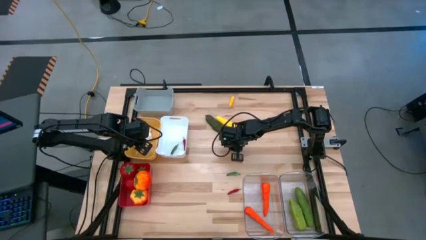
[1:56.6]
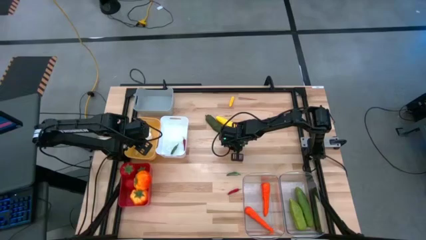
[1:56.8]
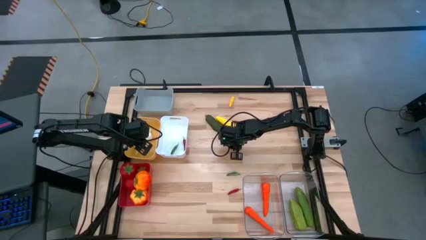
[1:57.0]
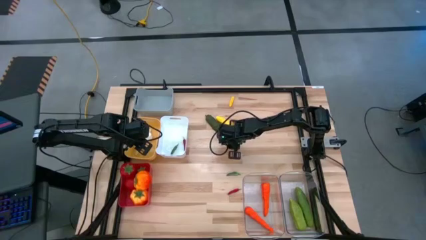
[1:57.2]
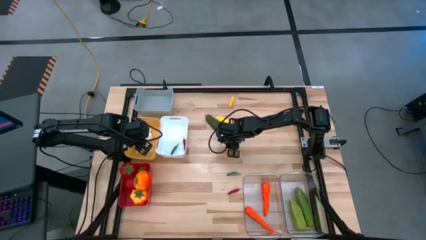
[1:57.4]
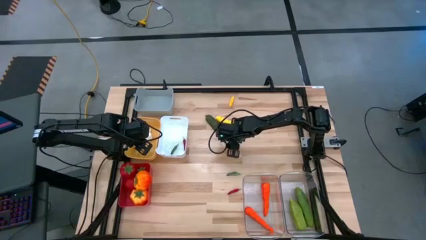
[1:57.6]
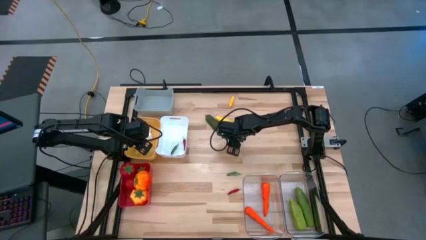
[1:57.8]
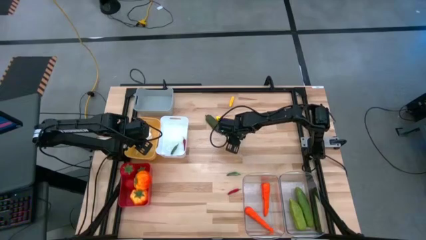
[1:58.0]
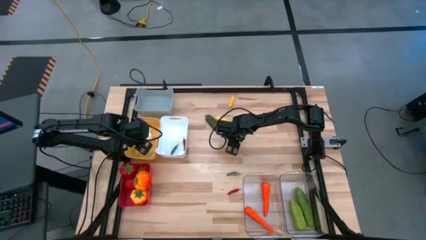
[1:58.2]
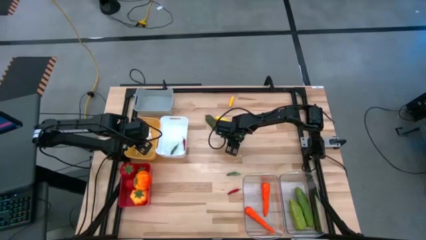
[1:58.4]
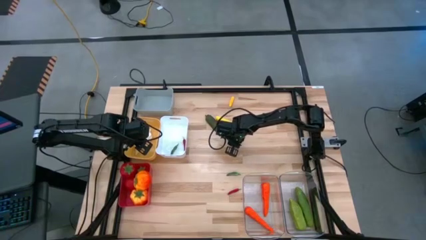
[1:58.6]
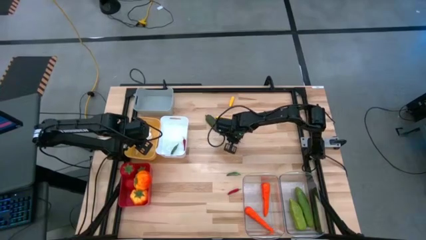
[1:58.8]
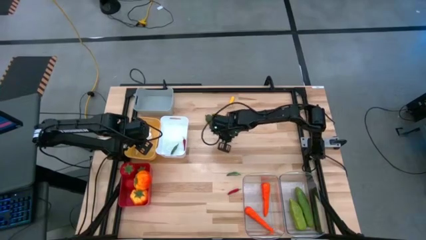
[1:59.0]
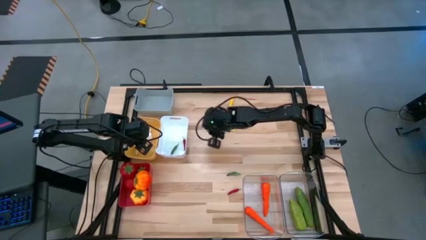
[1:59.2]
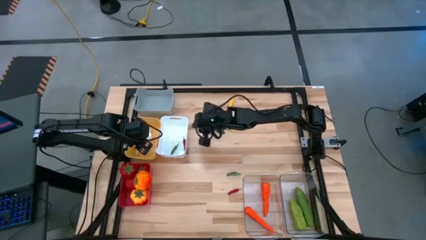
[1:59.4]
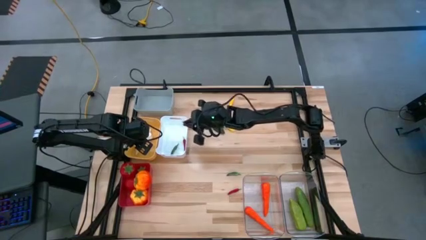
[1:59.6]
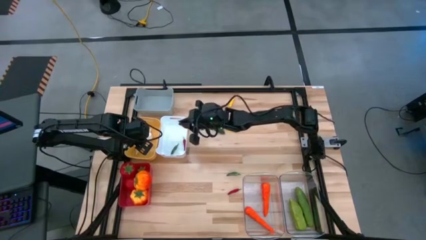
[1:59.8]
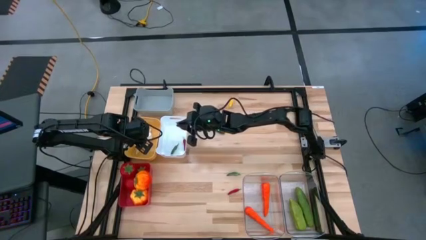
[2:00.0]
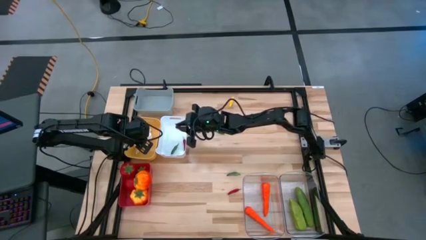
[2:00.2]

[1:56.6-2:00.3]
Task: Sort produce into baskets
Put the top red chili pepper into the white bin

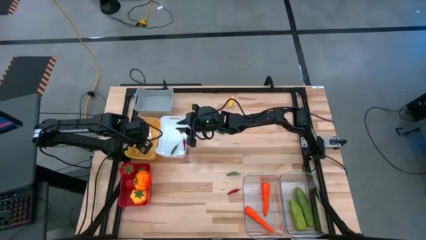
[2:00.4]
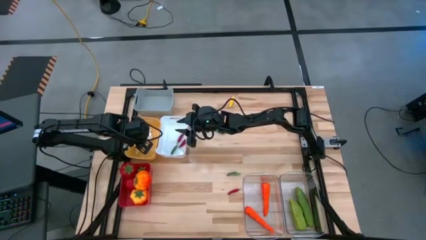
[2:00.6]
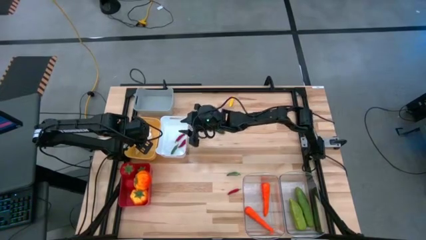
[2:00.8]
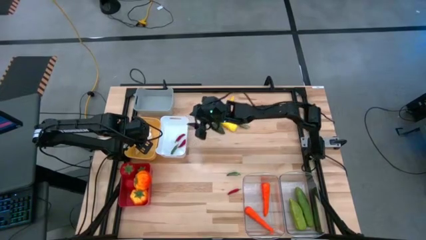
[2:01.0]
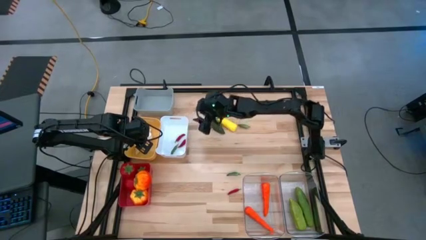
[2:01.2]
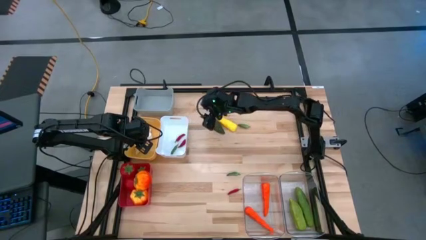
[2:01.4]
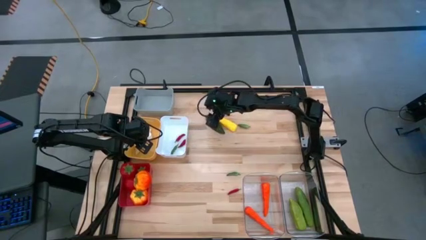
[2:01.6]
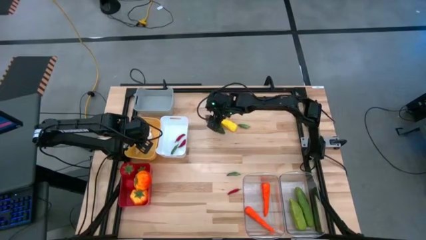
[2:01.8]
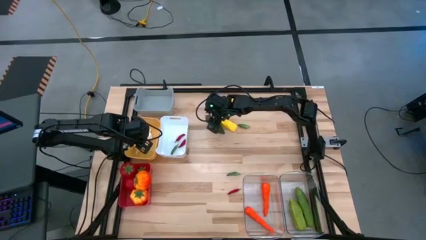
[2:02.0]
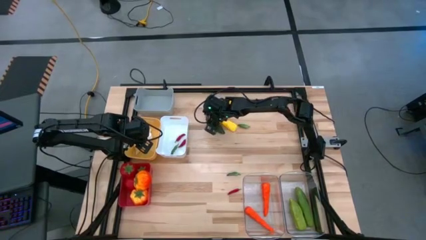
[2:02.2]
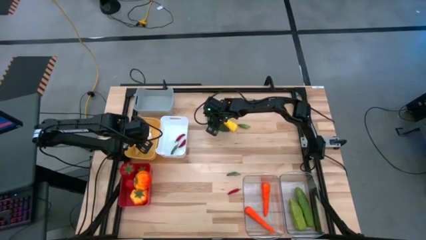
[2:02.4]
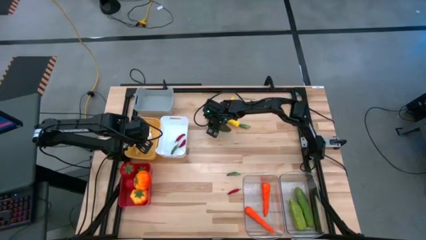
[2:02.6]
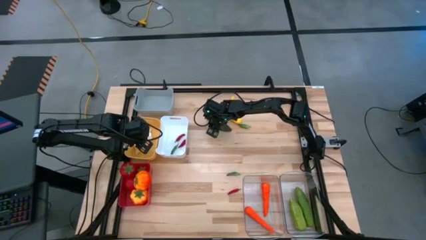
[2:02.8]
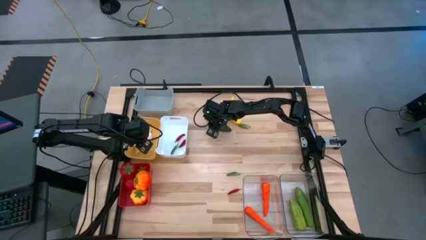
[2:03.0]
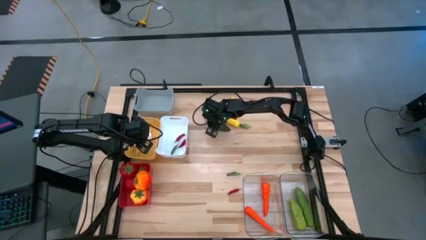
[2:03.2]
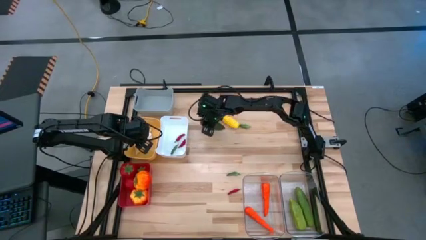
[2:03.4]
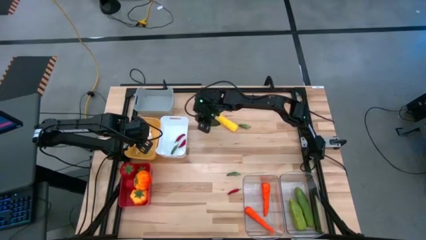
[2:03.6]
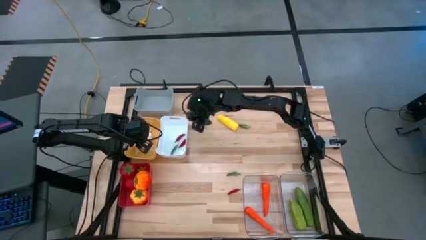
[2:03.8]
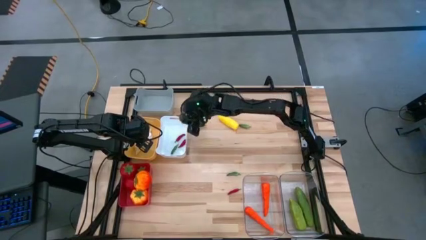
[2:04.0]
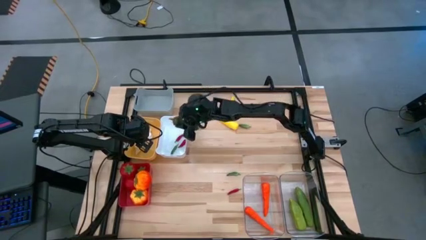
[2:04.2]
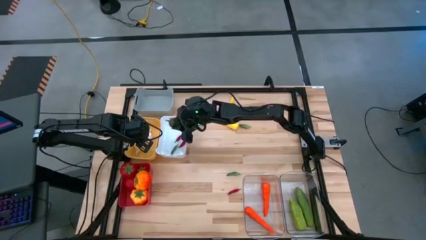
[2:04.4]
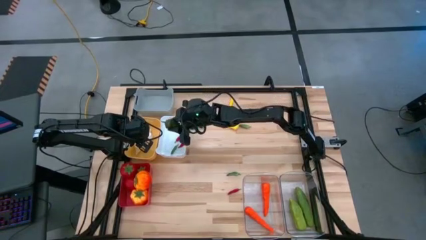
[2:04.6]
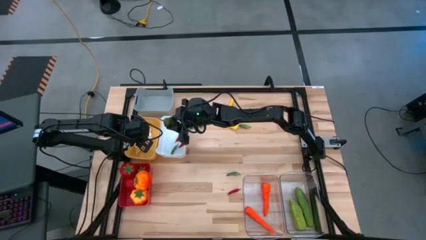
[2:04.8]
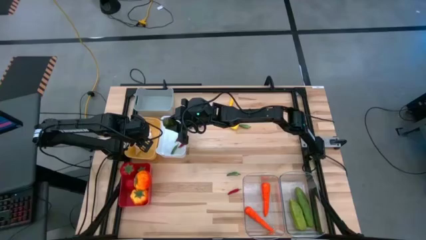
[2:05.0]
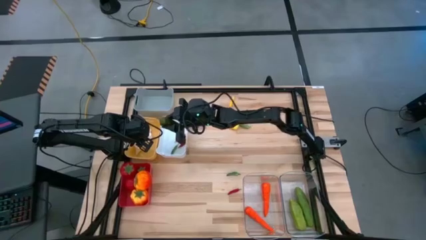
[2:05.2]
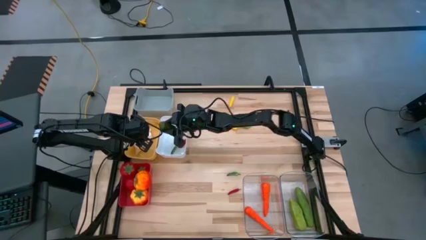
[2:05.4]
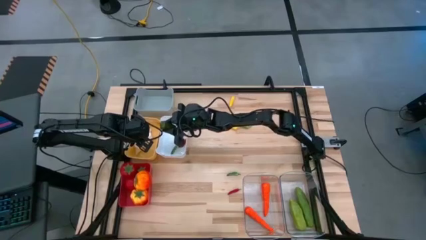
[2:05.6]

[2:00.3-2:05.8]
Put the green chili pepper into the white bin

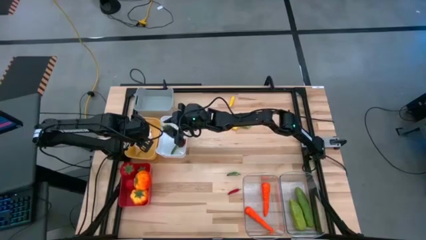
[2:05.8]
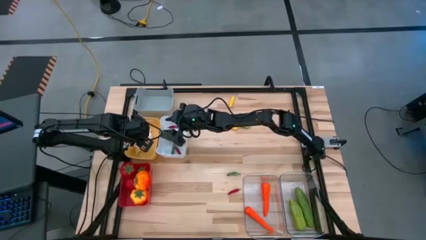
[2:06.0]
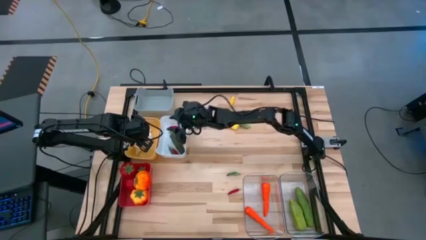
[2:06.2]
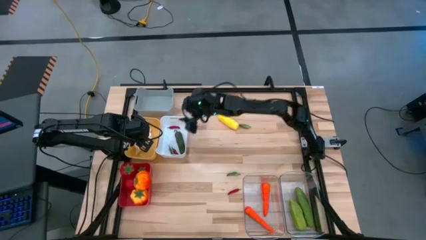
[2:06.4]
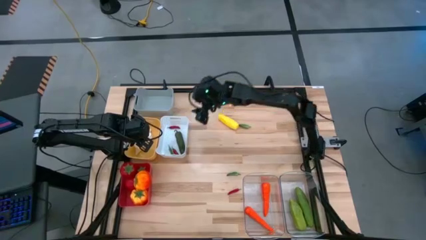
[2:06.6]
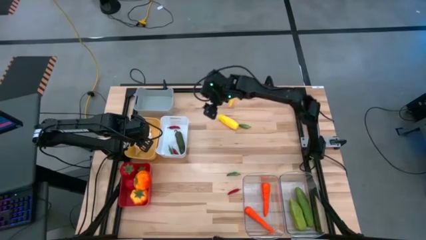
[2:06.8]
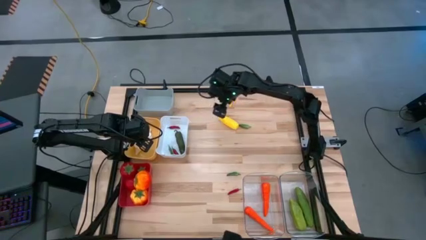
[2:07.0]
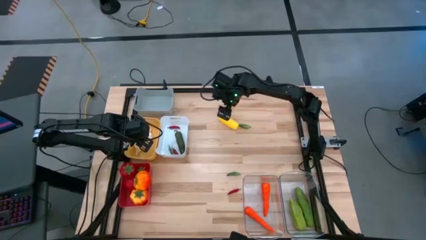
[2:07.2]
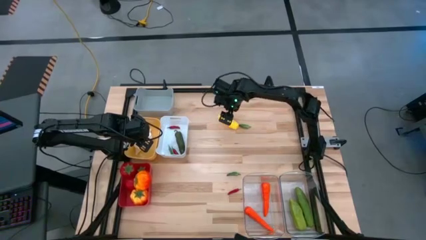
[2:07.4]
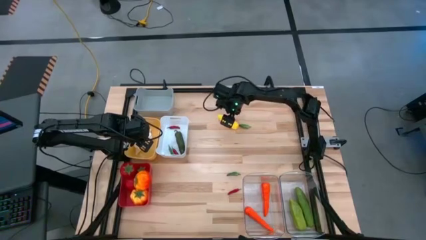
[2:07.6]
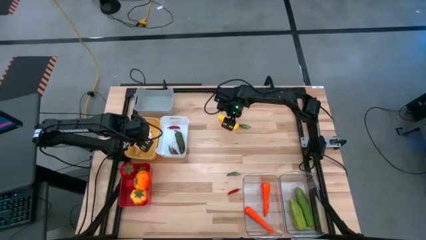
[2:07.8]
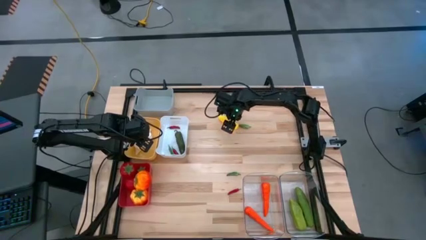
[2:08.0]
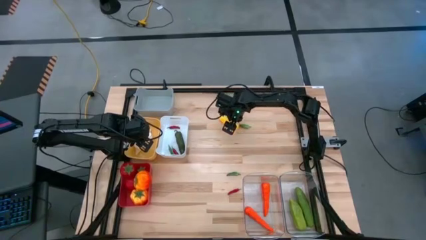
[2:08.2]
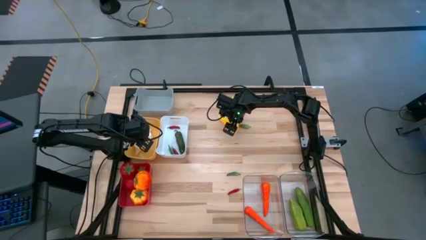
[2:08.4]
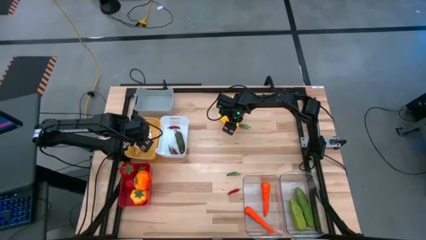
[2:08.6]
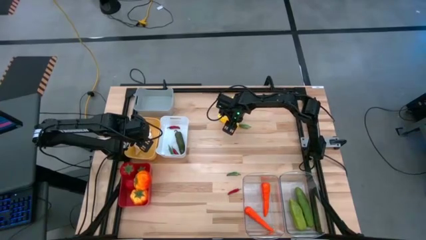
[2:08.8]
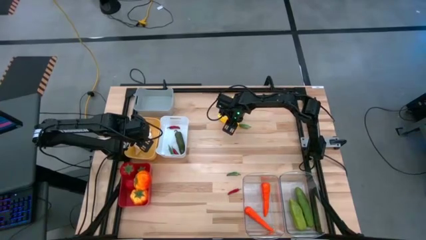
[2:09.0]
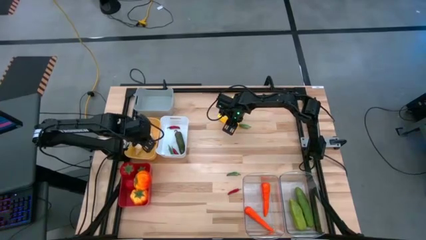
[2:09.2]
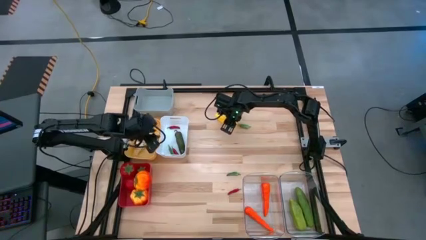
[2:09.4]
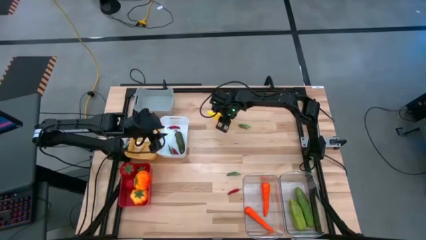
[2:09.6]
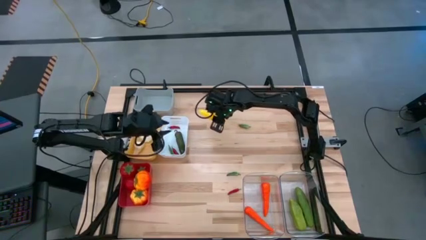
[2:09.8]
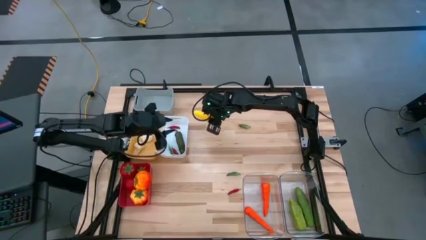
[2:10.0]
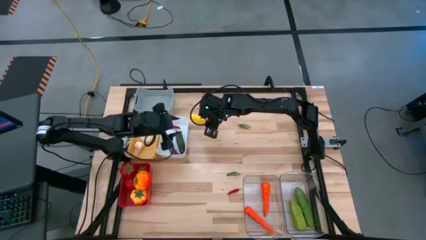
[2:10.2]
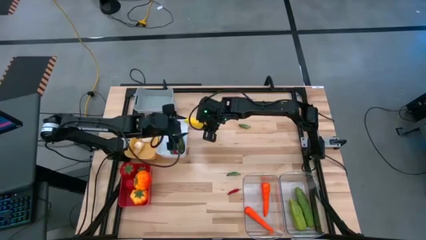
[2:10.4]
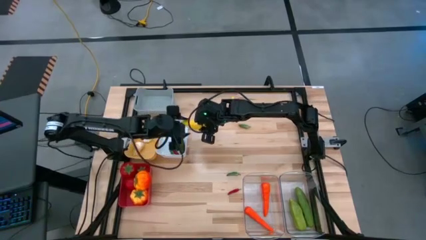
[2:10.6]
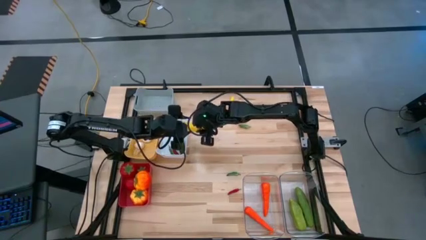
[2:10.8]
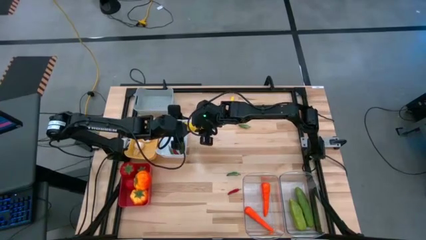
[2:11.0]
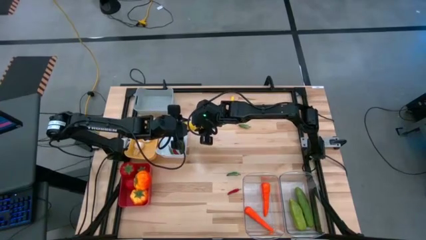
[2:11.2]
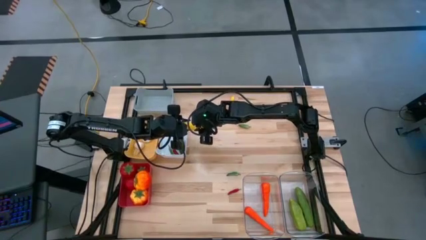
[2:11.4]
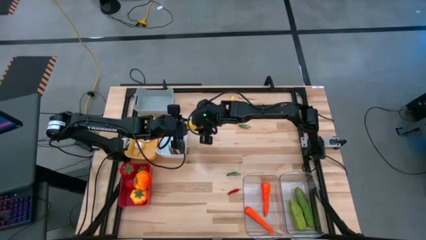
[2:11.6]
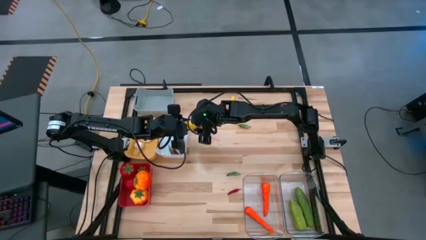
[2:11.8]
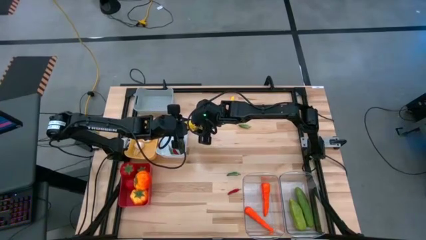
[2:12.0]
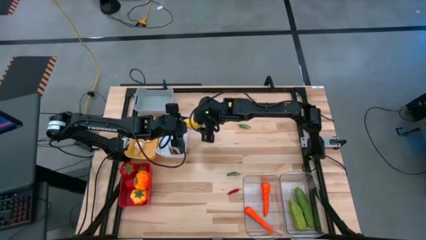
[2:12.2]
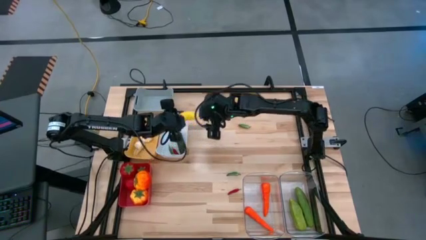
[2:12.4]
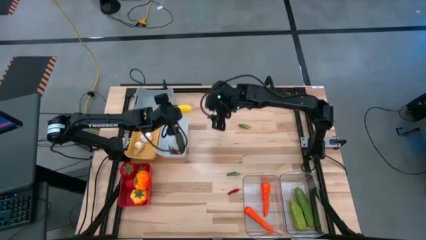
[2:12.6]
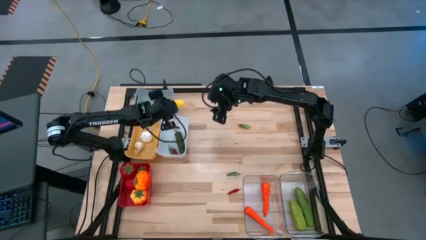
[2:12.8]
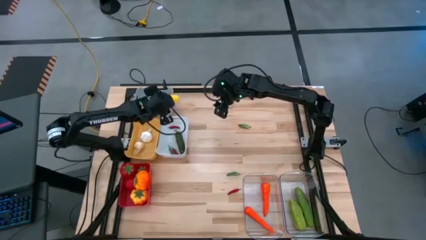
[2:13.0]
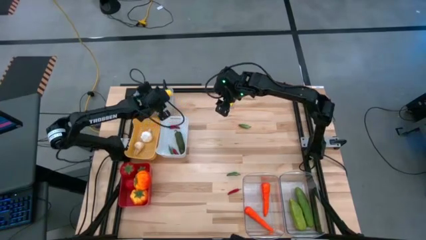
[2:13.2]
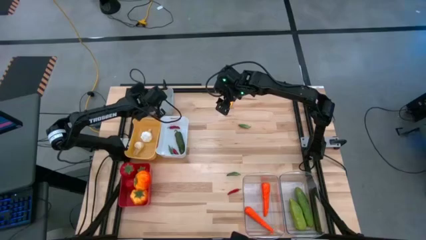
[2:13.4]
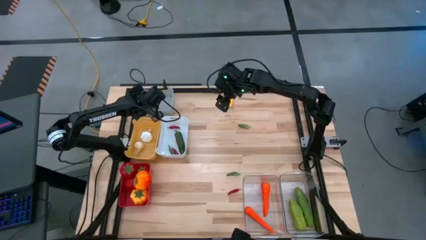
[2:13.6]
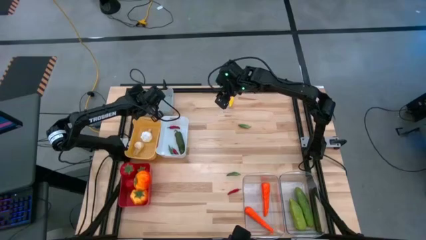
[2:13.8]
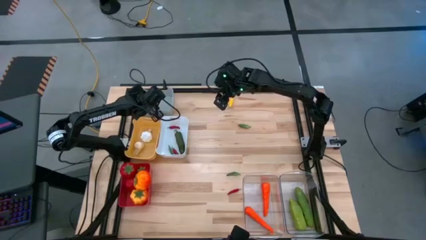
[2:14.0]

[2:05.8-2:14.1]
Put the big yellow corn into the gray bin
